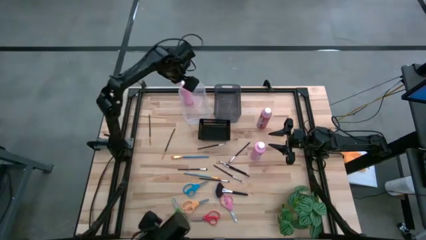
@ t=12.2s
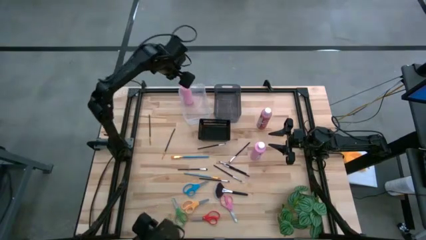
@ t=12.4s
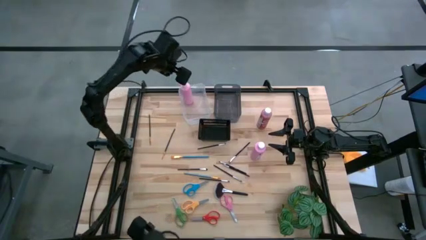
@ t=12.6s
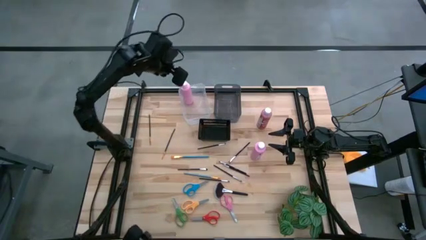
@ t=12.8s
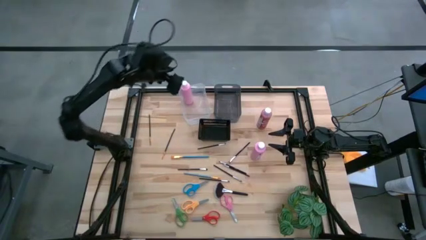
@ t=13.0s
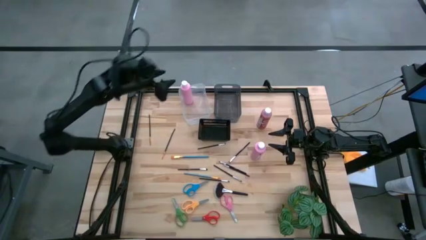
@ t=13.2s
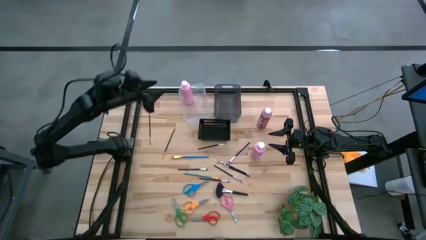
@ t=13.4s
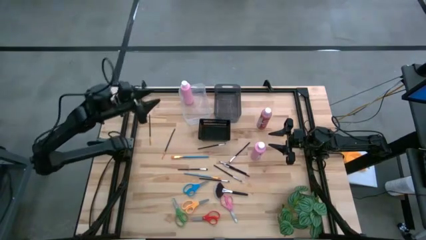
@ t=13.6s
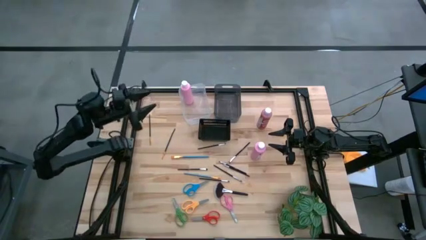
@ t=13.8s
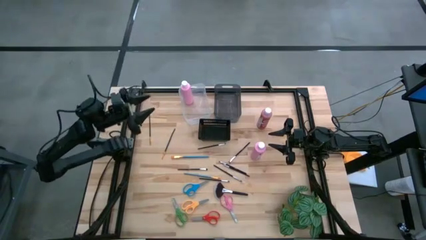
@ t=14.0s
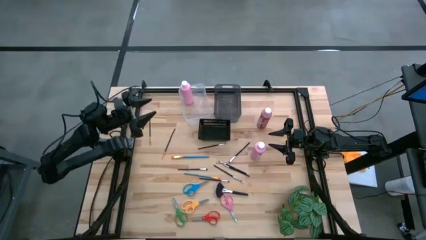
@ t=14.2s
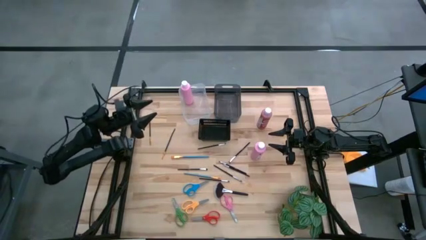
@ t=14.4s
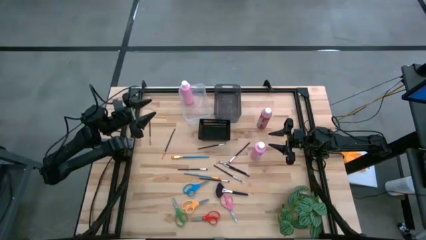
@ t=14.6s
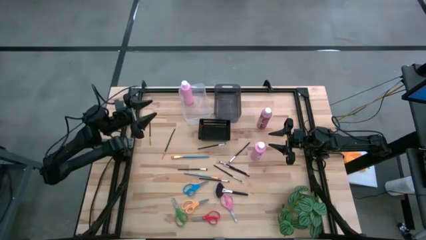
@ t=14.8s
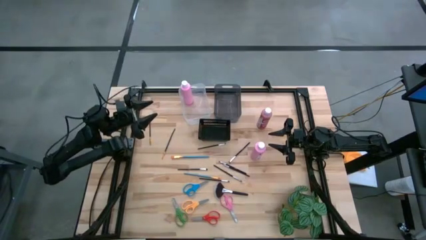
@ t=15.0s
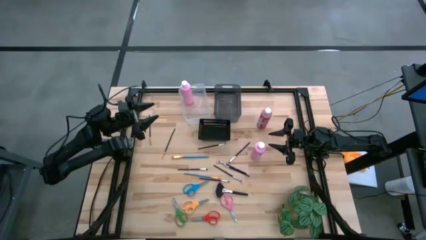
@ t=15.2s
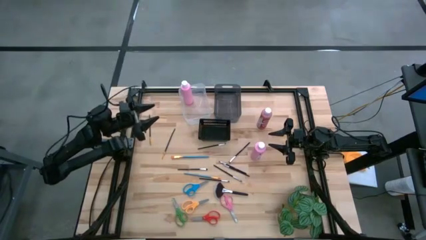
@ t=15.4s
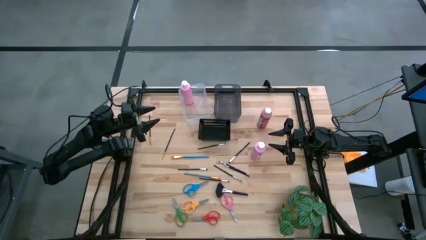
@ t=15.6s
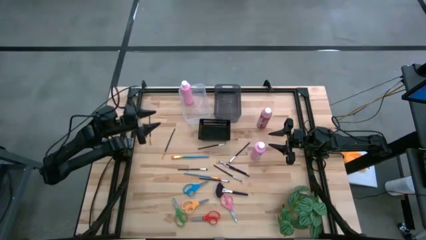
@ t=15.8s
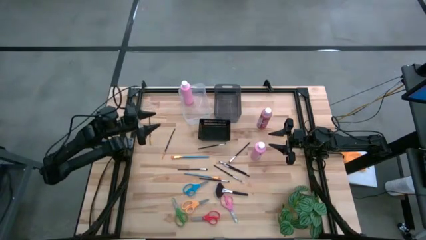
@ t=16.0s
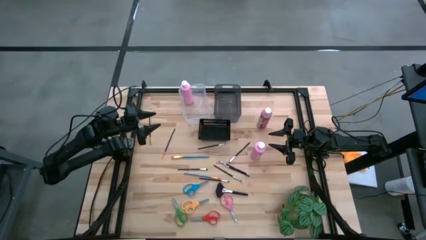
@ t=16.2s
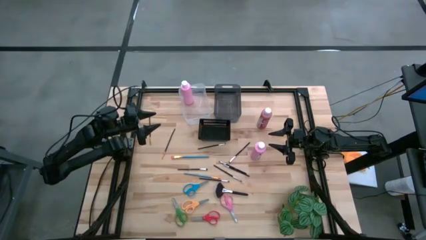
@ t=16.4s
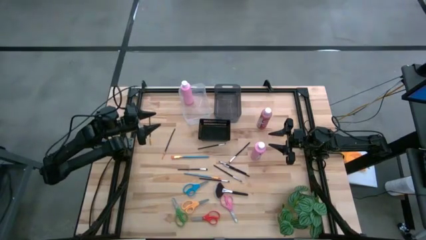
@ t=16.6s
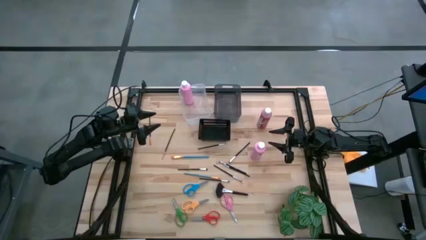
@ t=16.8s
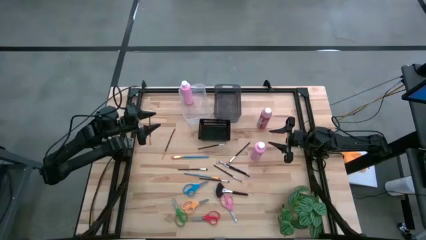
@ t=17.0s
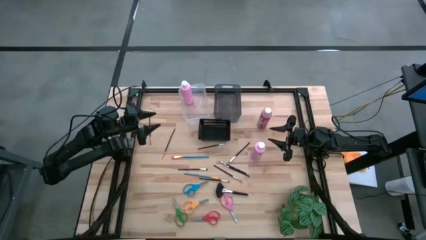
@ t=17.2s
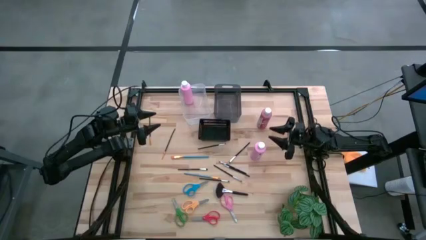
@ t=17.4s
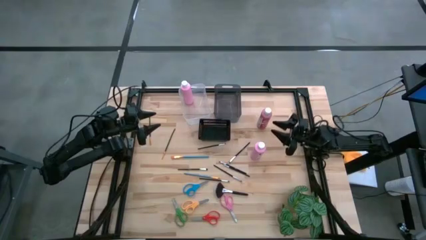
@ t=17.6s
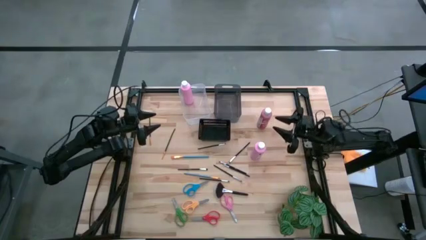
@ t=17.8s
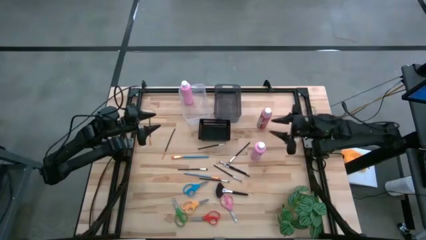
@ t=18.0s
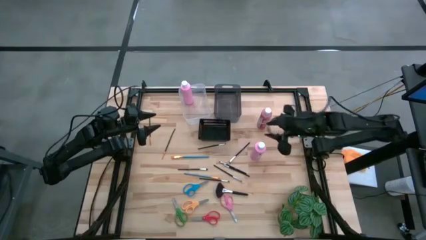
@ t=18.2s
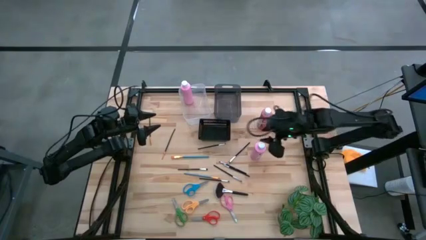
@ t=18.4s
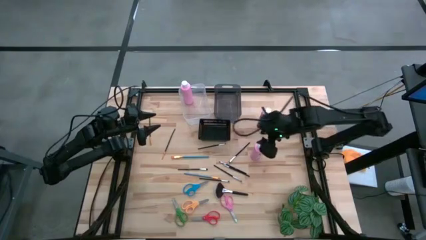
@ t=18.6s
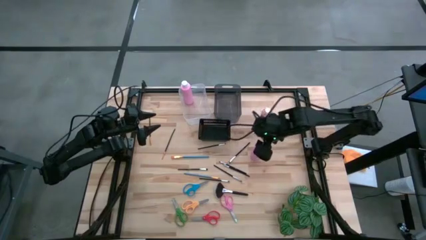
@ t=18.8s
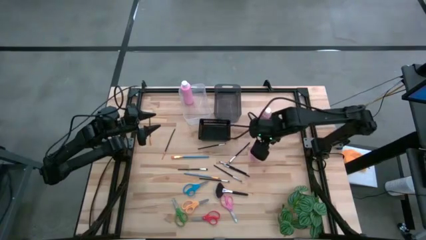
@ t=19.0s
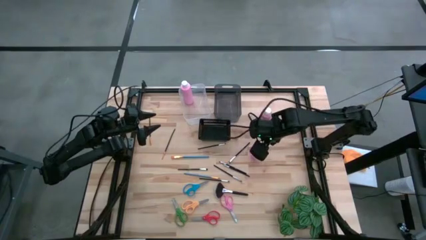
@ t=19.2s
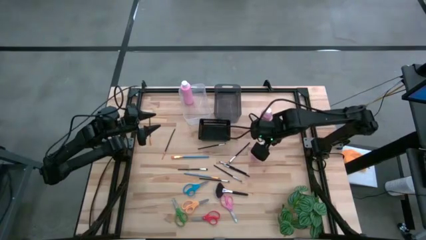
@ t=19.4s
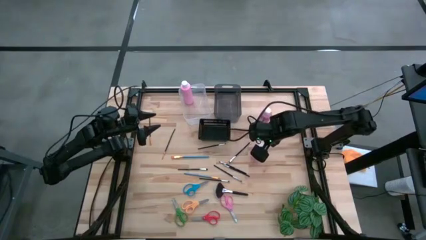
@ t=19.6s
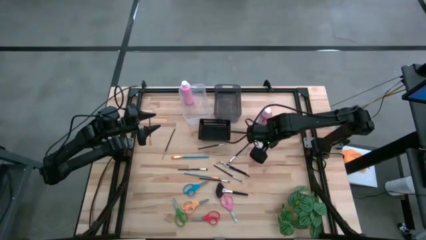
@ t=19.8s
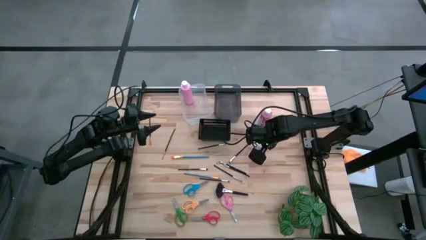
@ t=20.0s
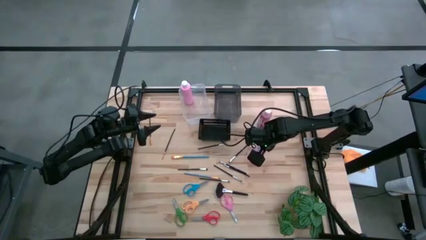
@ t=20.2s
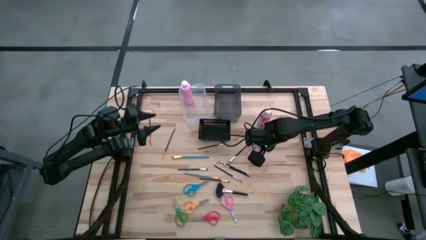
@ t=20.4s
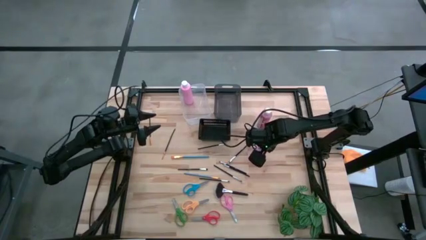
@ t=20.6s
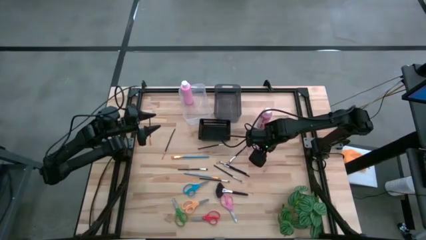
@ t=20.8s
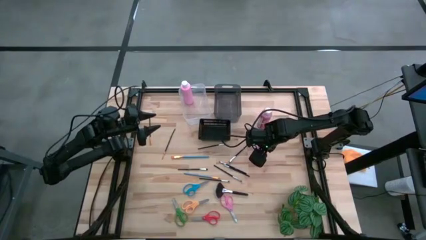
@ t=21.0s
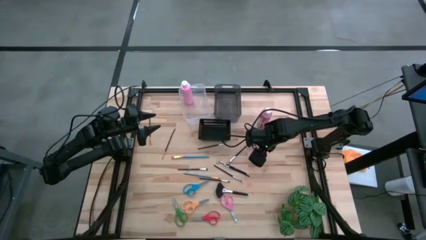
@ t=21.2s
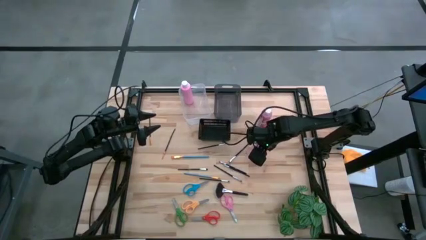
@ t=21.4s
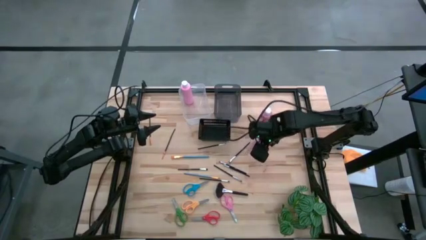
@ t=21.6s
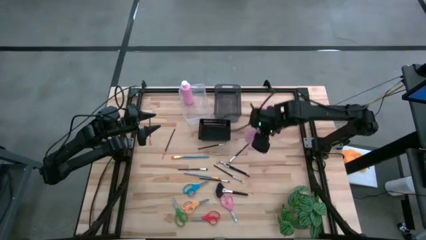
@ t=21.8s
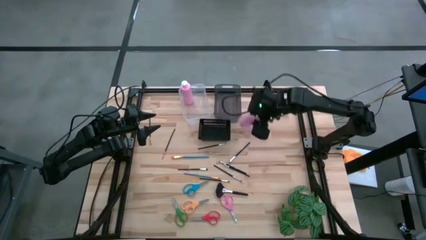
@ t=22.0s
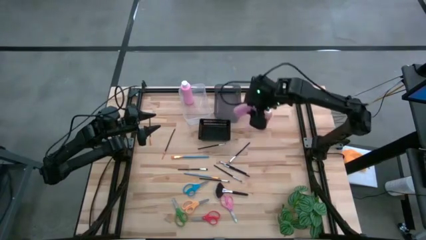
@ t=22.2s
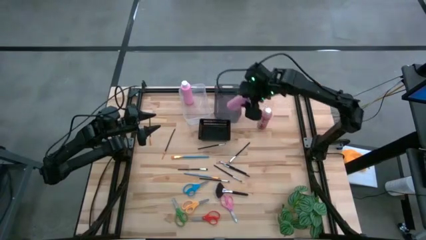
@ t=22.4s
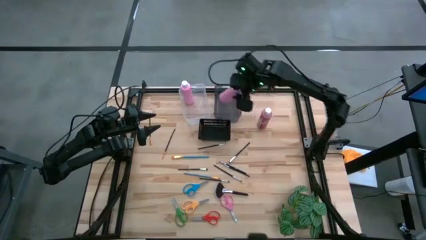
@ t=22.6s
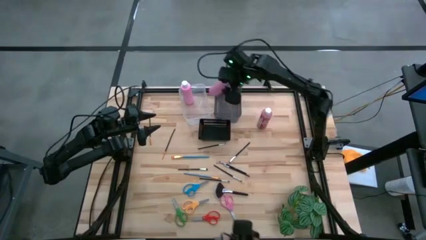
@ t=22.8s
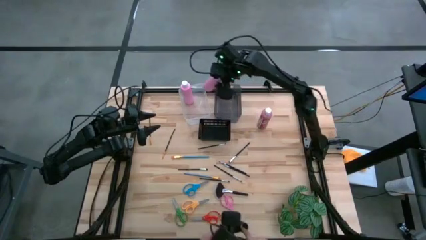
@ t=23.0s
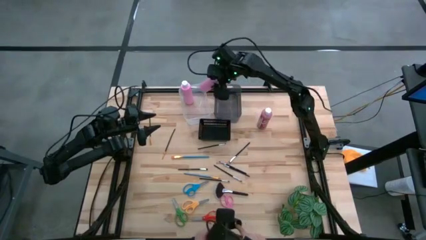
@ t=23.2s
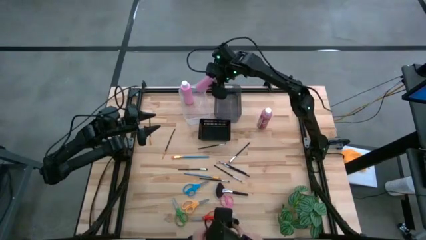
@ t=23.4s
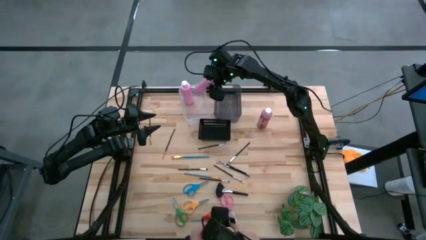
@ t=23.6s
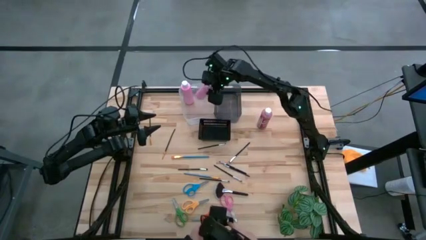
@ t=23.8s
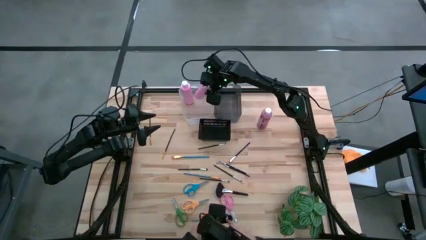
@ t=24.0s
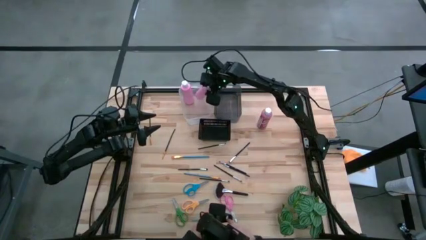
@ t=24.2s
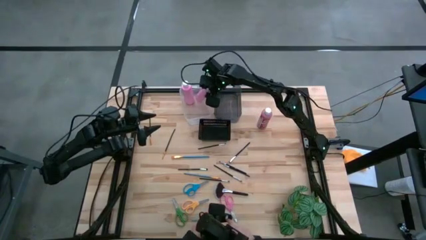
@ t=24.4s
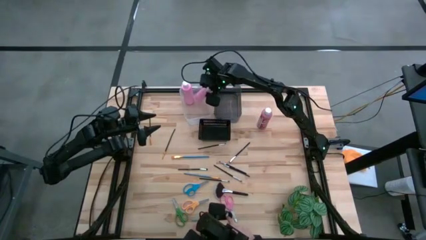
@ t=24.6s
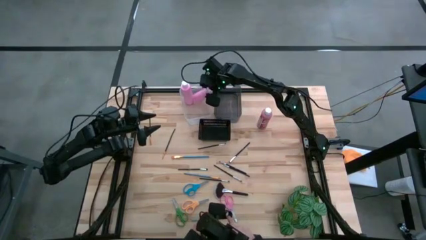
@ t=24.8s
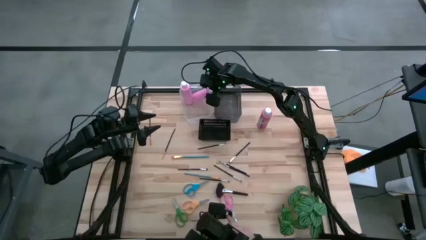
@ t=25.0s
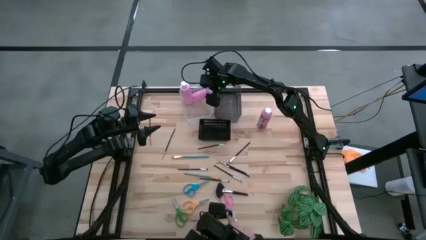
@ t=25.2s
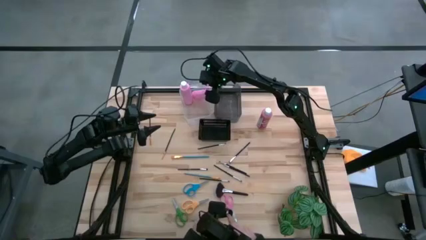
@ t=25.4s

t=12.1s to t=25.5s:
Task: Pick & Place Paint Supplies
Put the pink paint bottle into the transparent bin

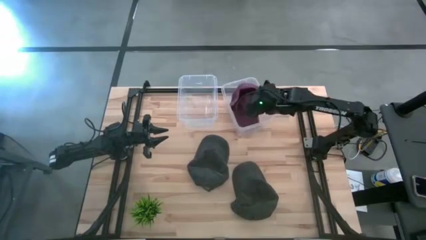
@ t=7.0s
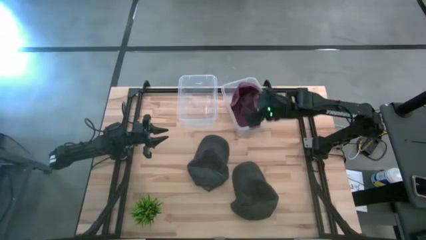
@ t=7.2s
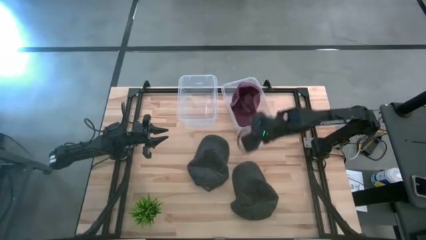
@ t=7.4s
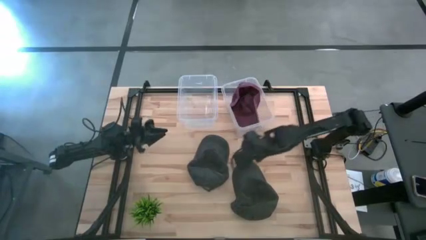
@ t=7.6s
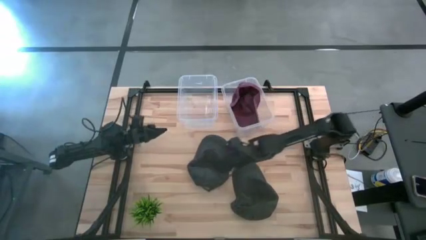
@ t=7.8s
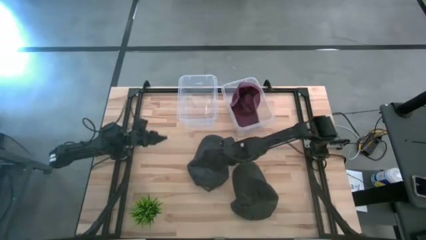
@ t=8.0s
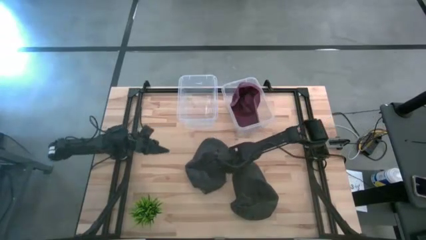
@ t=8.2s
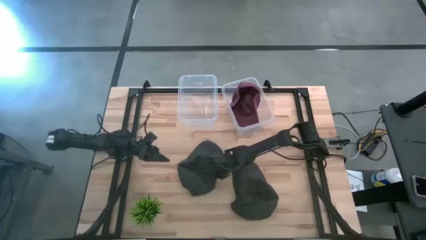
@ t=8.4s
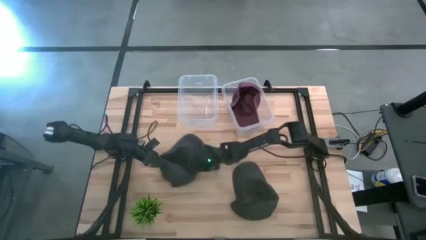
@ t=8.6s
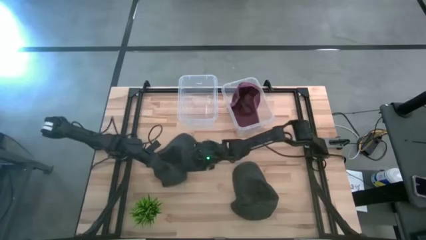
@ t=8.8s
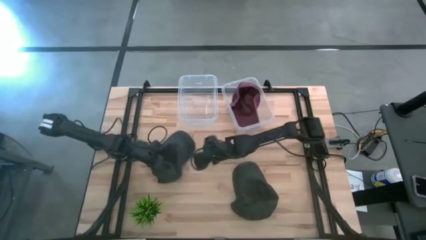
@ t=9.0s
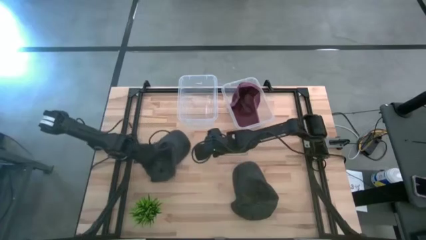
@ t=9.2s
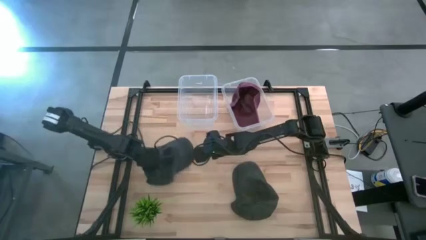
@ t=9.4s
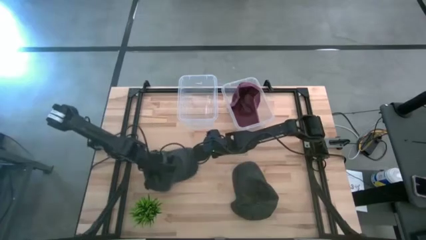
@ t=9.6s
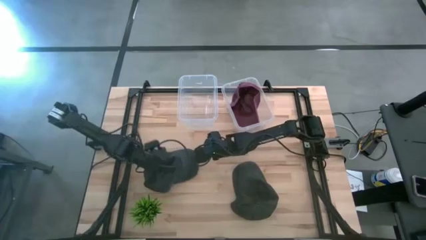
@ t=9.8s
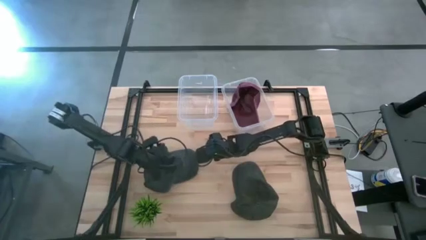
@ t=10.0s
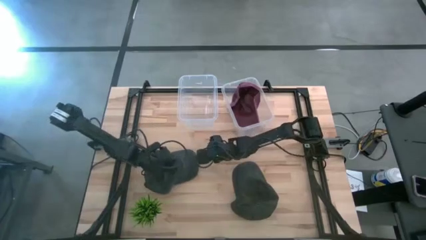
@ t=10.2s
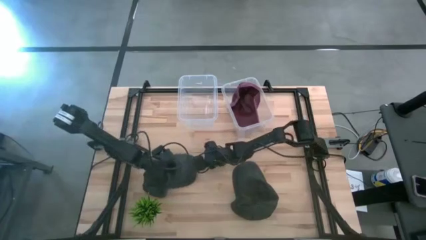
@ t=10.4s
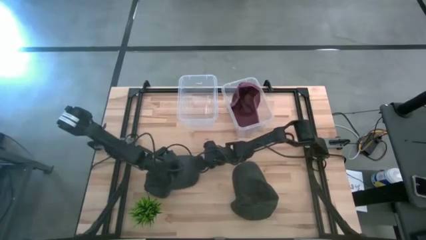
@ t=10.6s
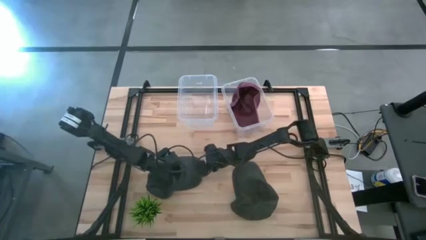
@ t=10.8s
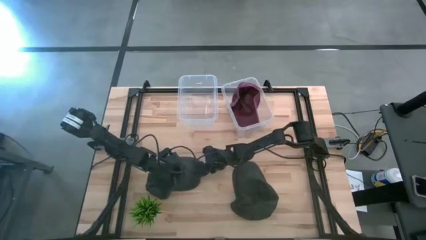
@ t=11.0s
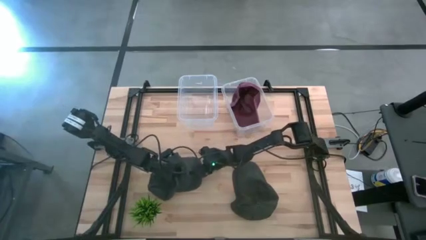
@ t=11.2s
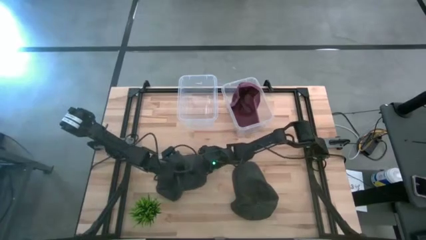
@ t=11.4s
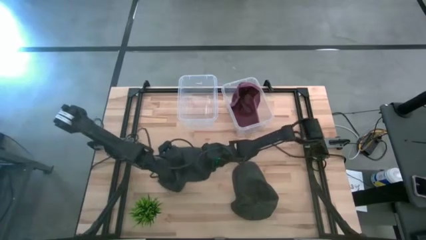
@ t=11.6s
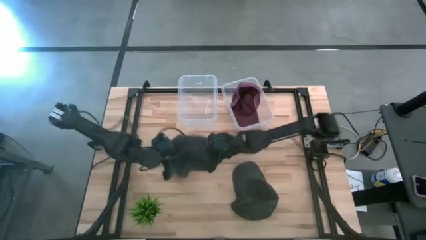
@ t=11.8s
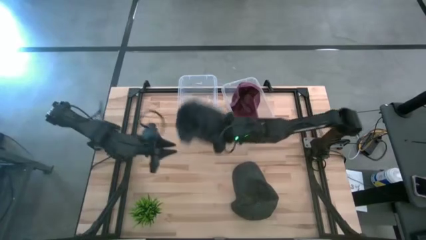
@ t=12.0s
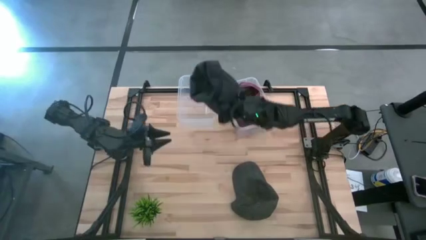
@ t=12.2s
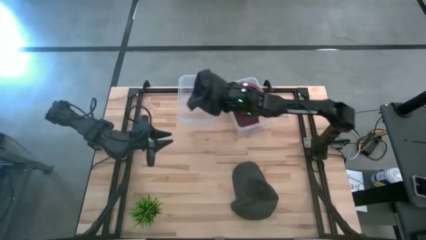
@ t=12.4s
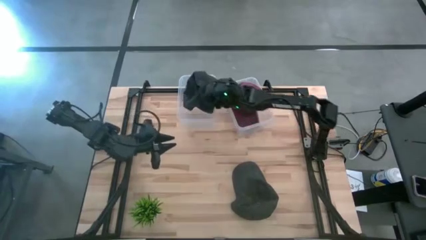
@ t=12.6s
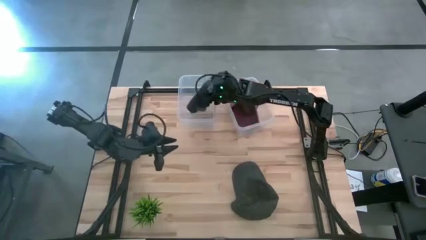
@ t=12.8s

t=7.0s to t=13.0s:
Task: Pick & Place hat
Put the left black cap into the left transparent bin
